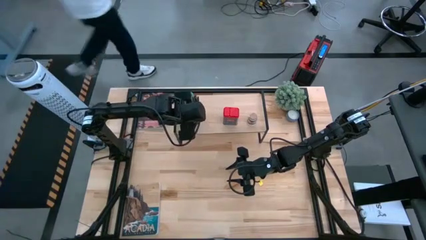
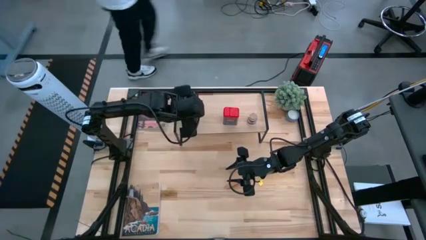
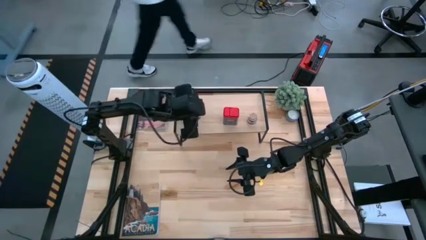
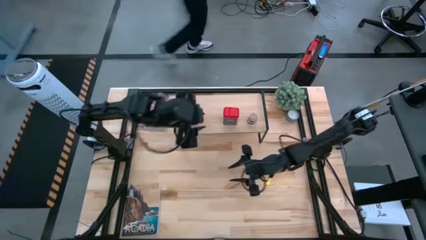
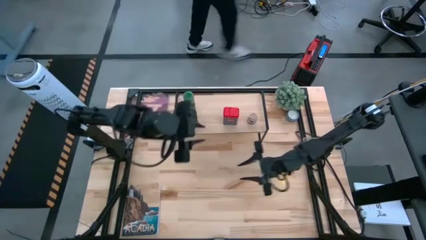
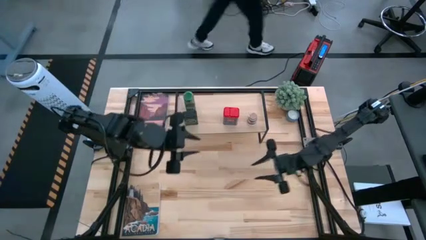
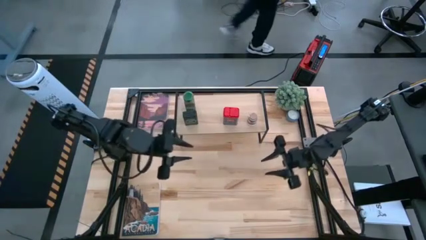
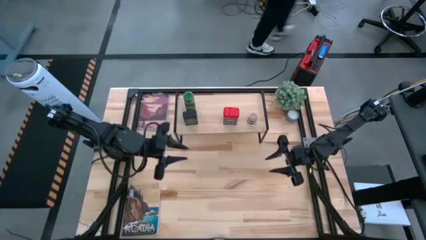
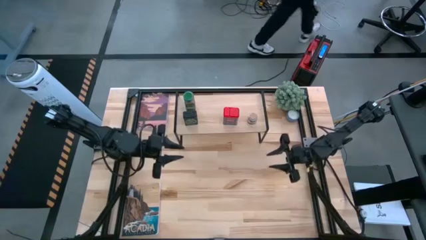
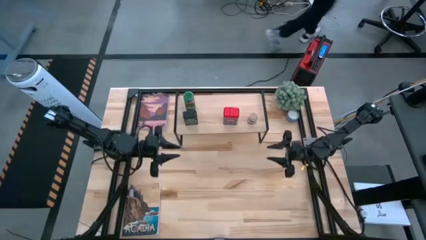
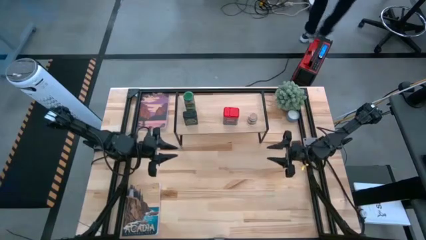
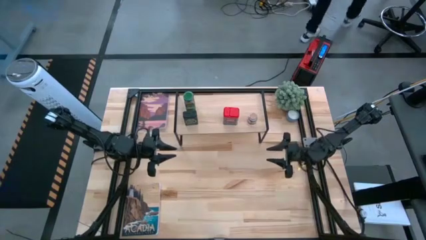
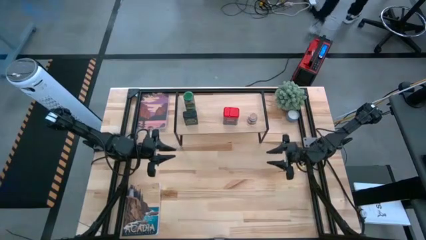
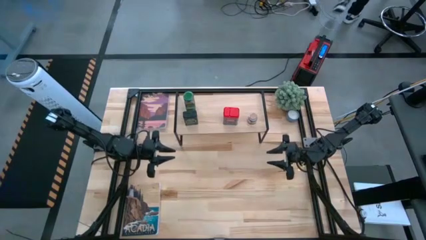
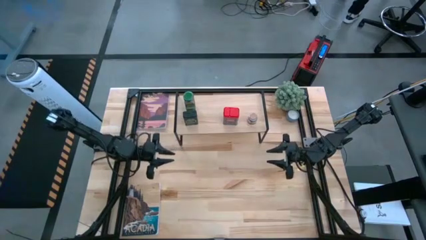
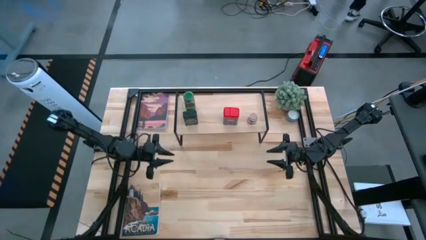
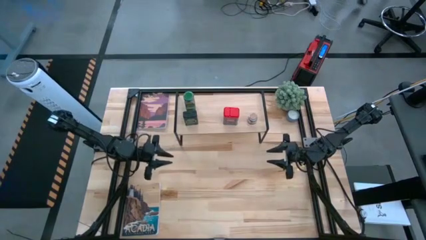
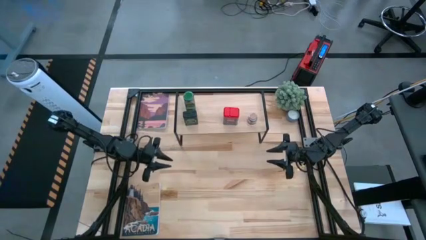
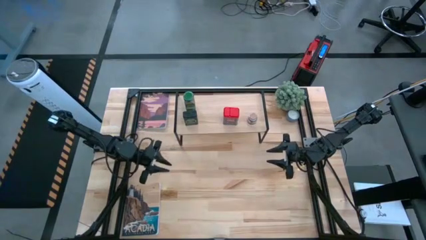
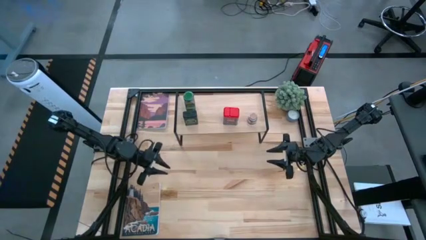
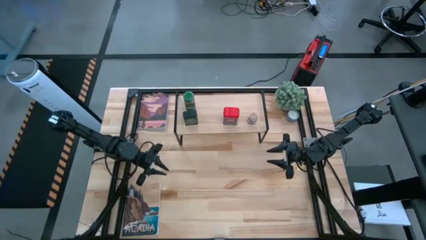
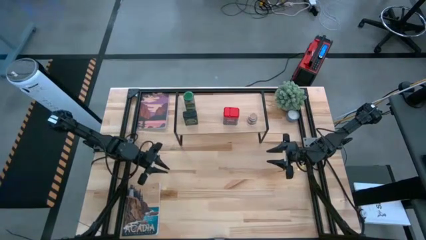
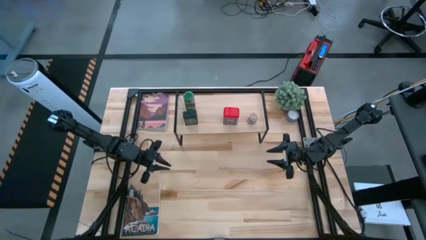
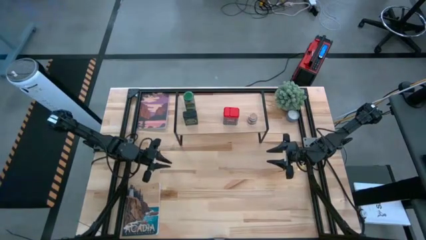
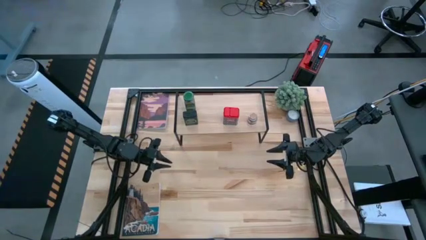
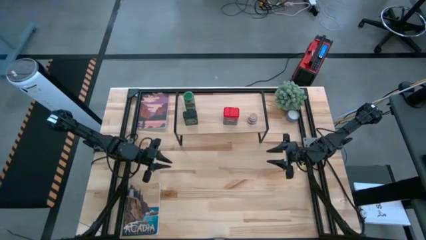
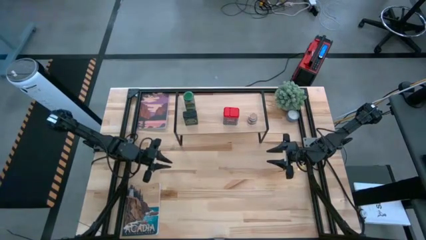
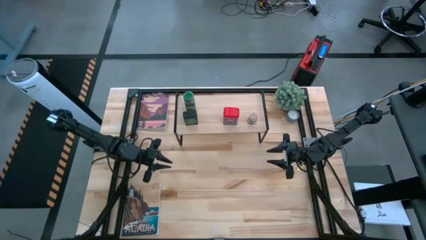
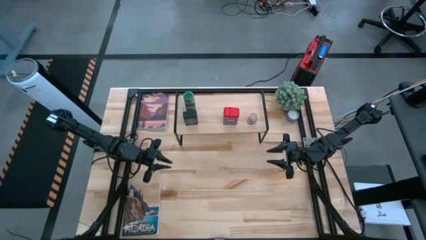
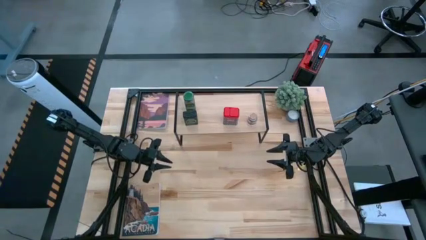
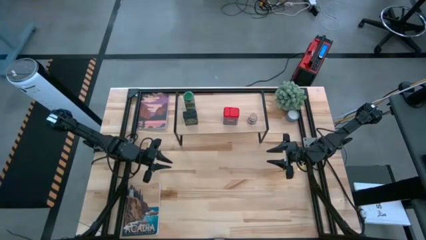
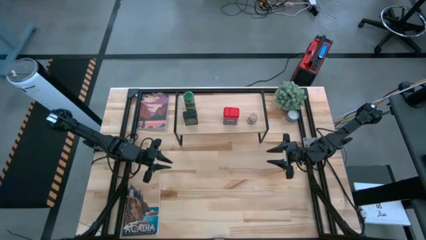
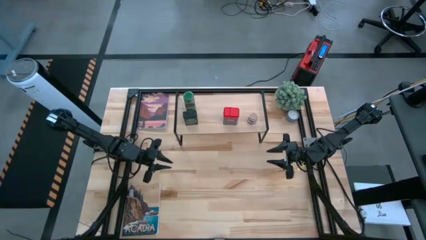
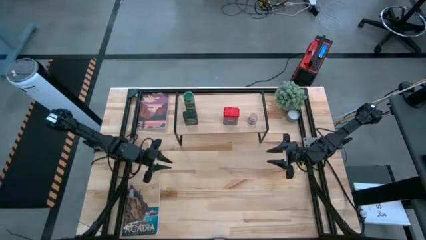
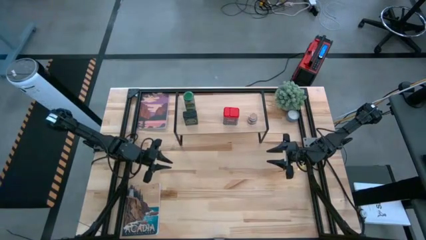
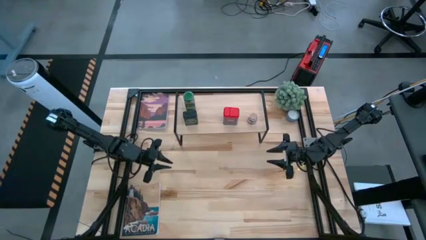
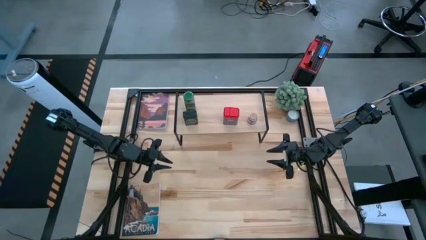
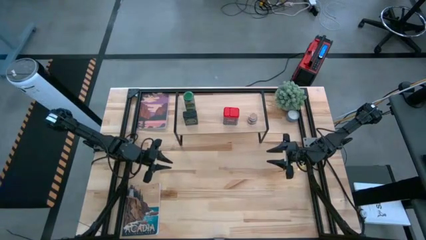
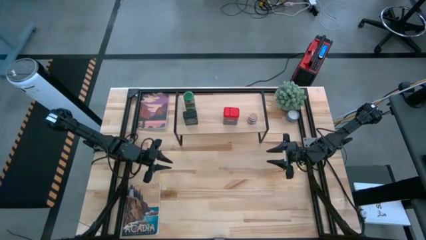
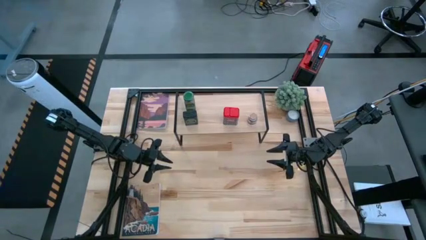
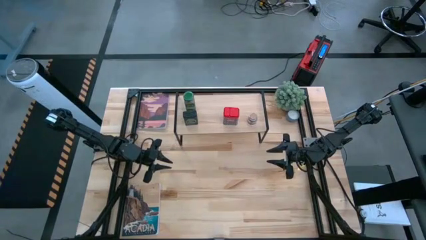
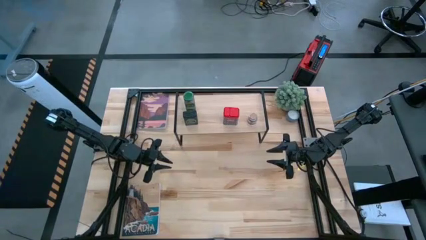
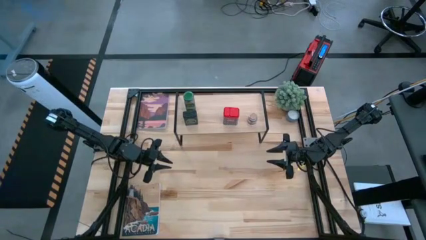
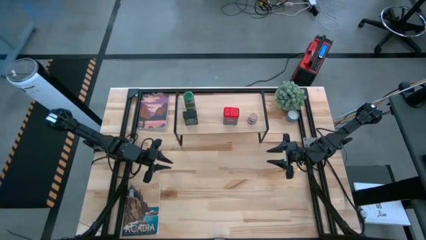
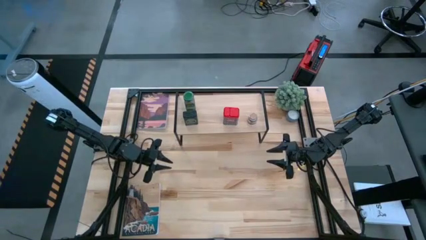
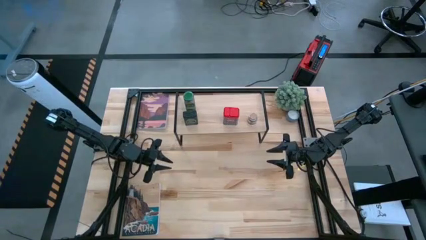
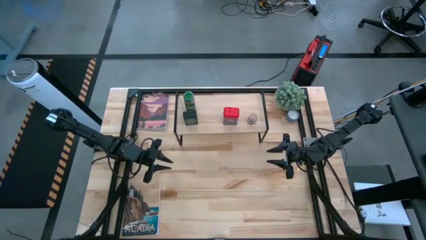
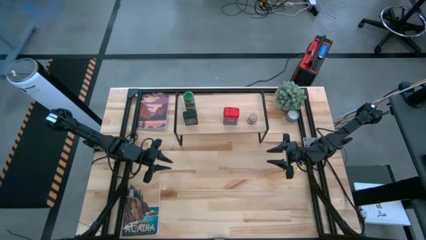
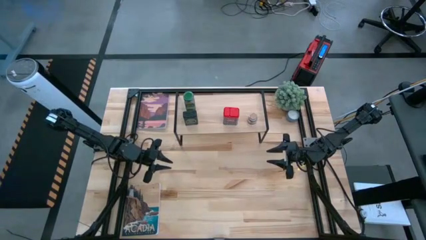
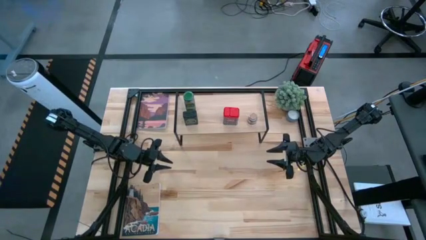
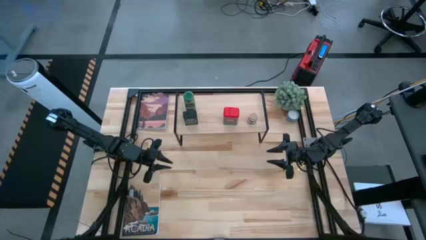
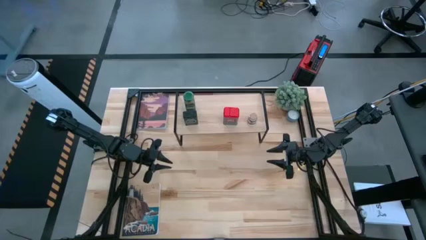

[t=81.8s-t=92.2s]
Task: Shelf spices
Return to Home Position

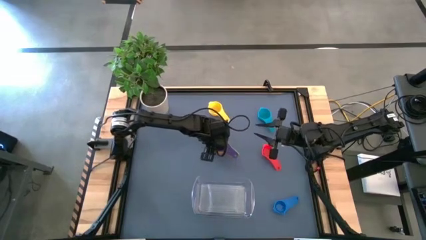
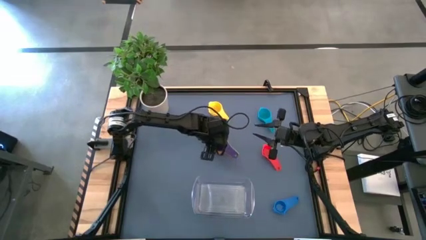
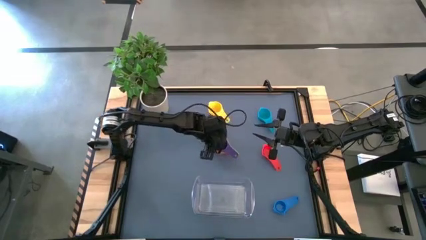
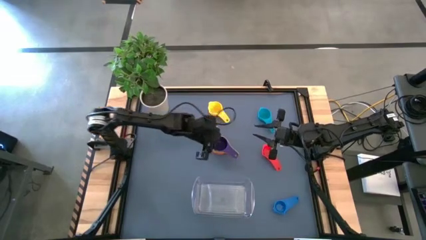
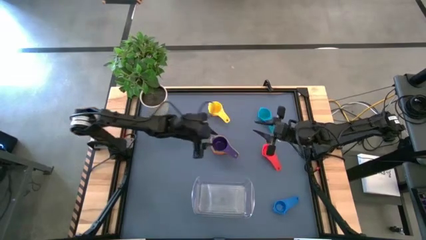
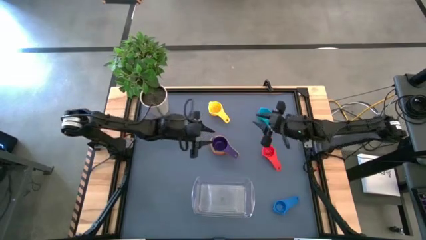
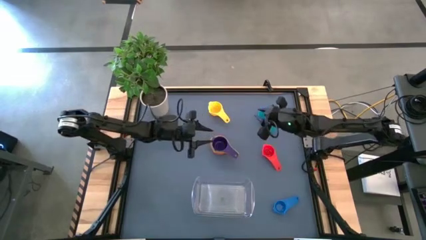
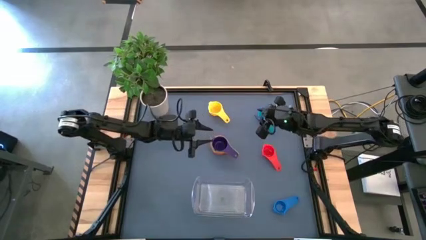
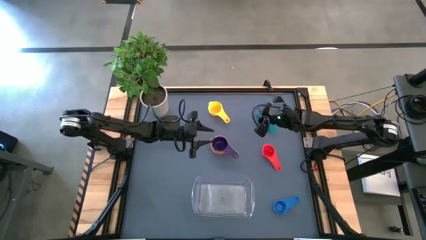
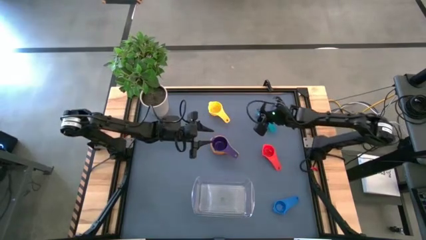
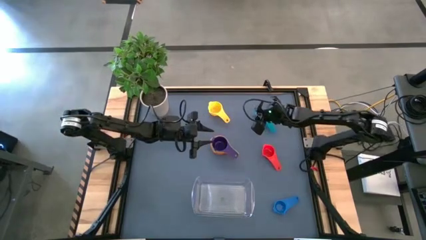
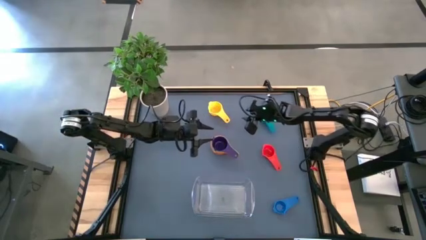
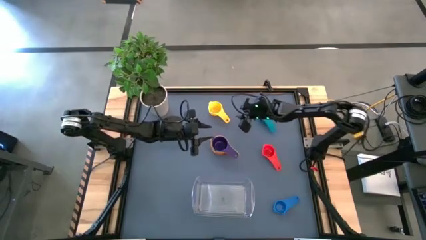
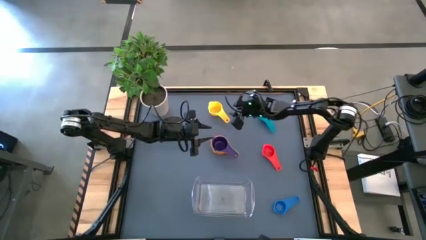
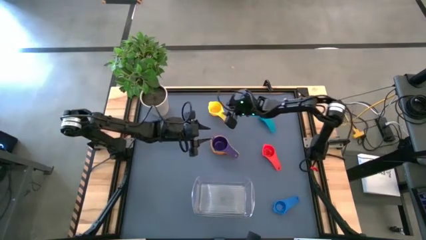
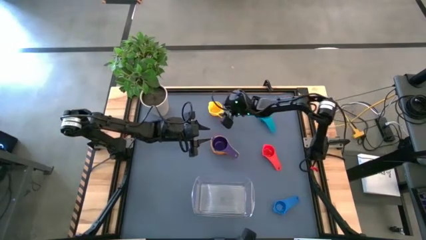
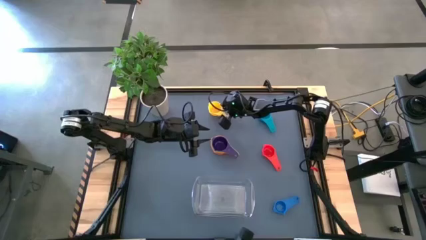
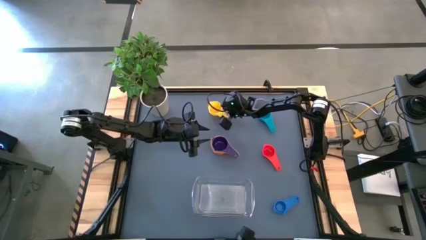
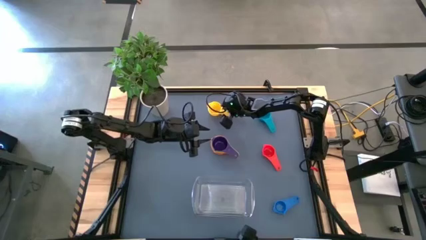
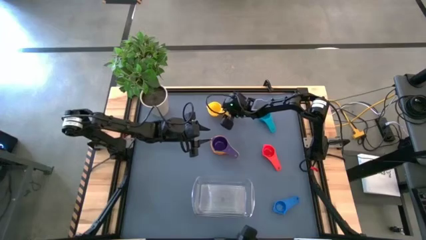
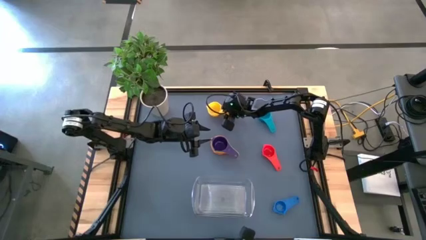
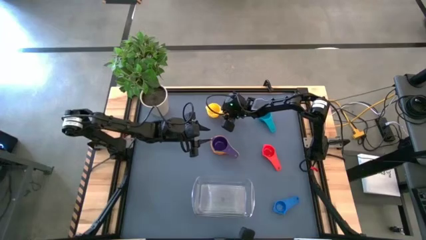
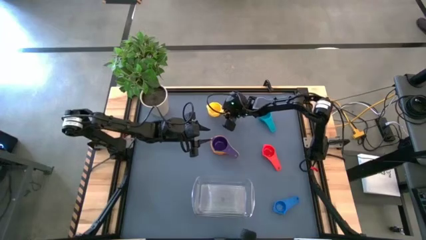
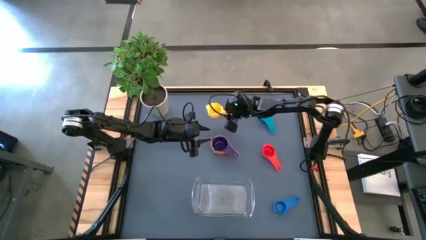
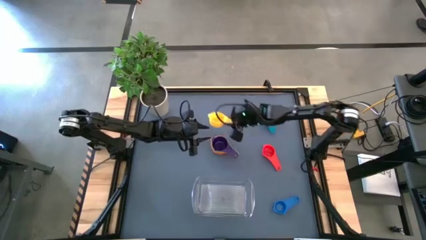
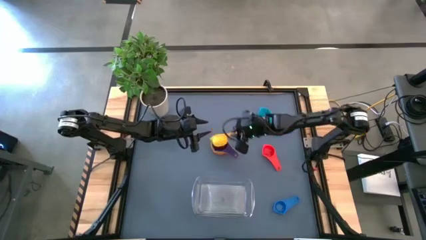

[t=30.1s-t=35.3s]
Task: Nest measuring cups in basket
Stack the yellow measuring cup on top of the purple measuring cup
